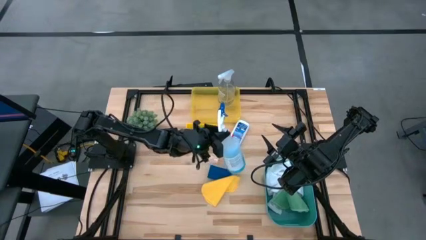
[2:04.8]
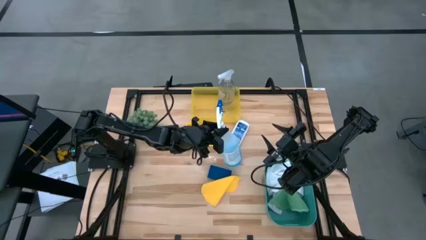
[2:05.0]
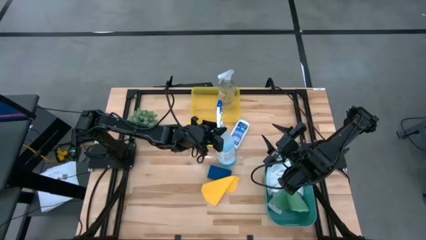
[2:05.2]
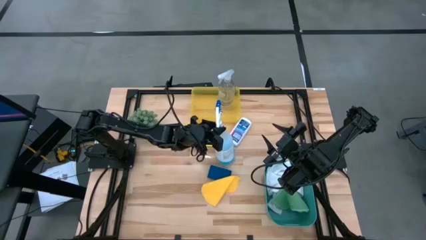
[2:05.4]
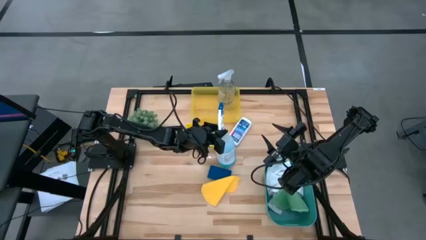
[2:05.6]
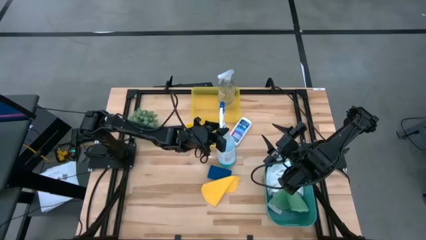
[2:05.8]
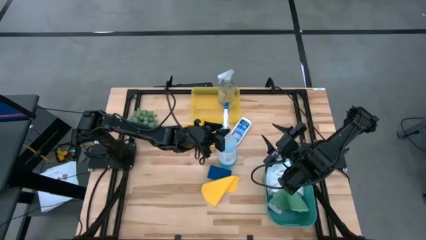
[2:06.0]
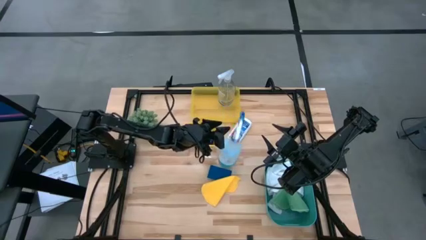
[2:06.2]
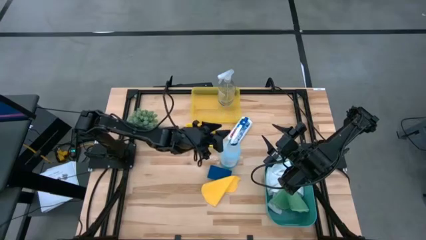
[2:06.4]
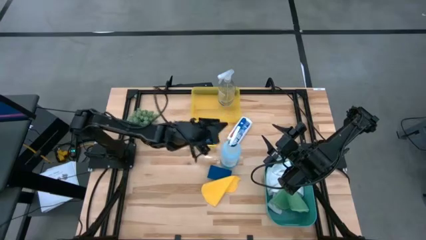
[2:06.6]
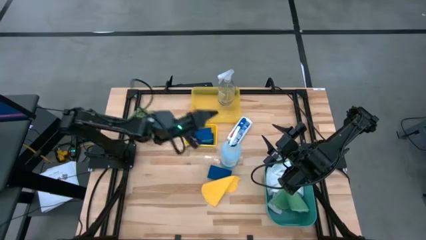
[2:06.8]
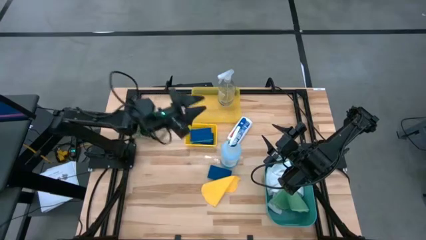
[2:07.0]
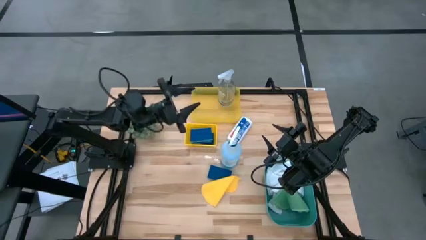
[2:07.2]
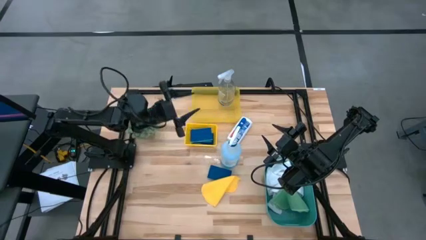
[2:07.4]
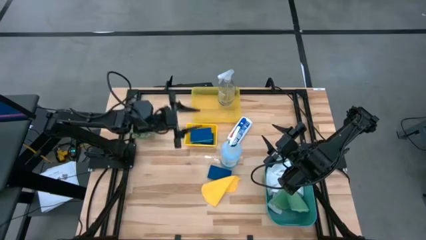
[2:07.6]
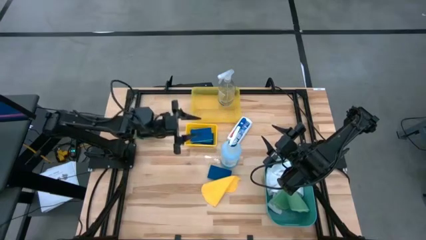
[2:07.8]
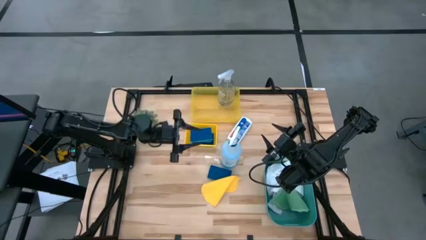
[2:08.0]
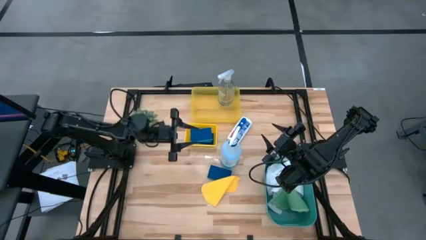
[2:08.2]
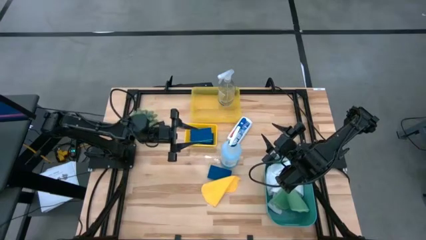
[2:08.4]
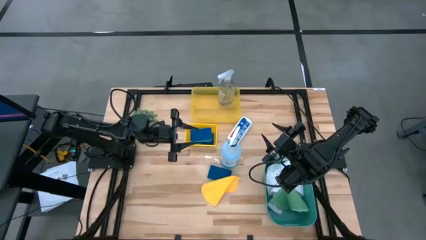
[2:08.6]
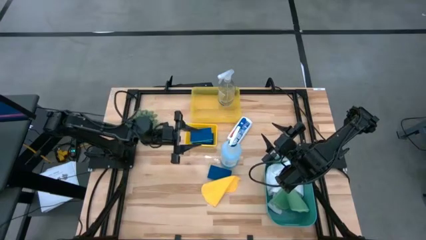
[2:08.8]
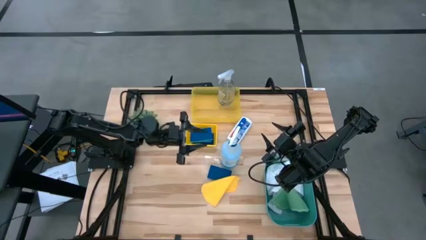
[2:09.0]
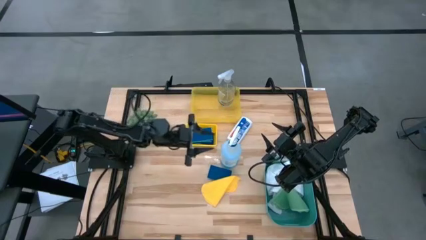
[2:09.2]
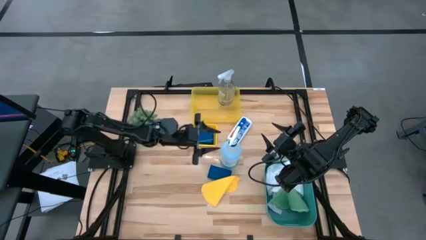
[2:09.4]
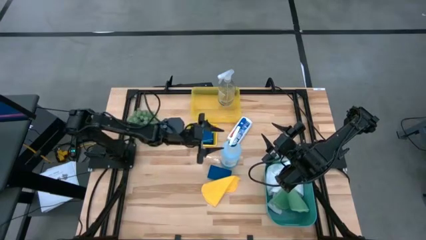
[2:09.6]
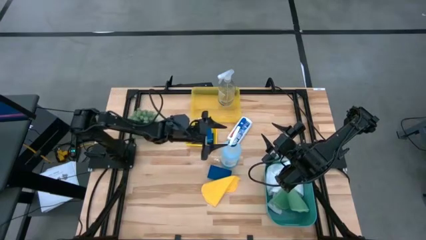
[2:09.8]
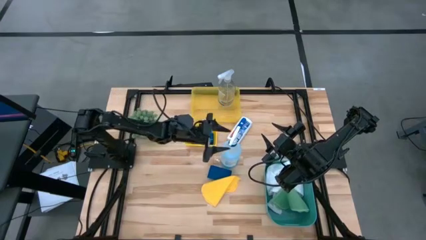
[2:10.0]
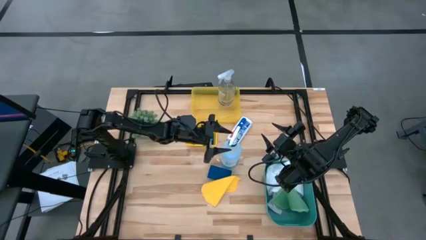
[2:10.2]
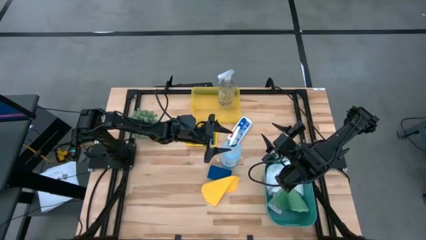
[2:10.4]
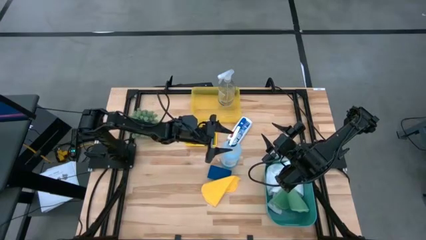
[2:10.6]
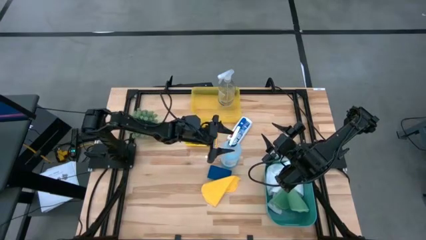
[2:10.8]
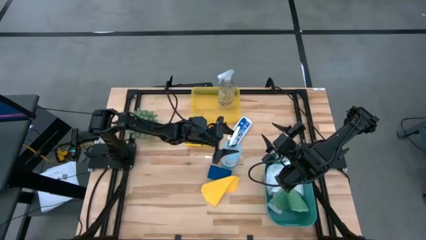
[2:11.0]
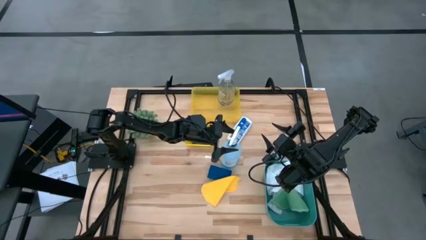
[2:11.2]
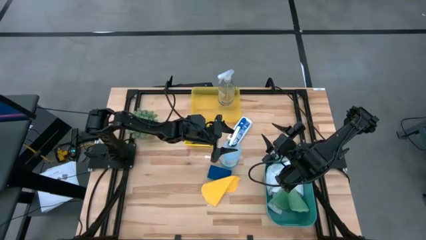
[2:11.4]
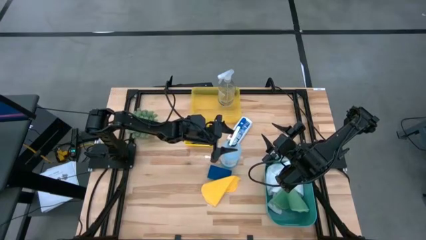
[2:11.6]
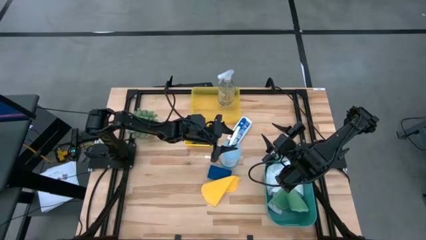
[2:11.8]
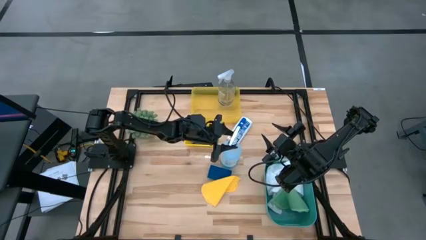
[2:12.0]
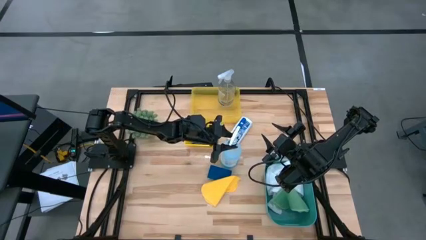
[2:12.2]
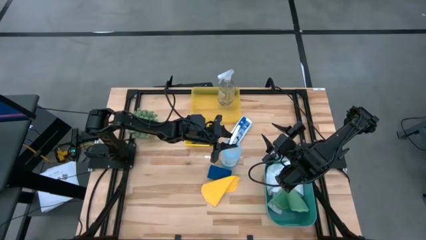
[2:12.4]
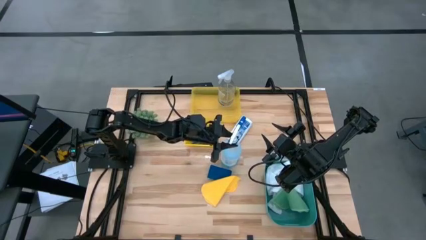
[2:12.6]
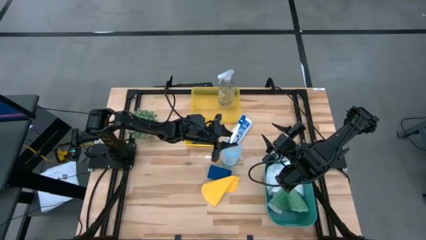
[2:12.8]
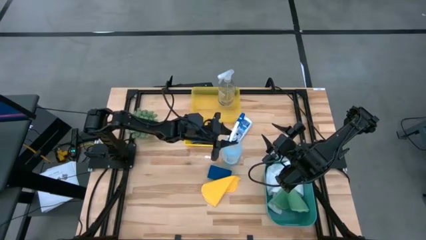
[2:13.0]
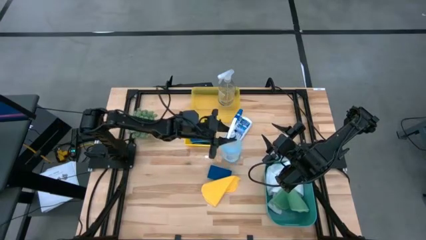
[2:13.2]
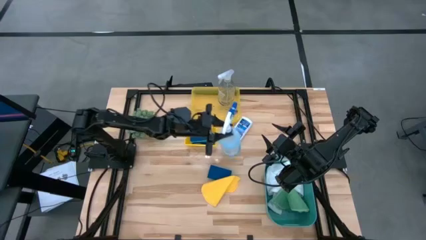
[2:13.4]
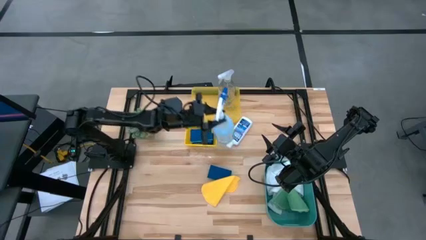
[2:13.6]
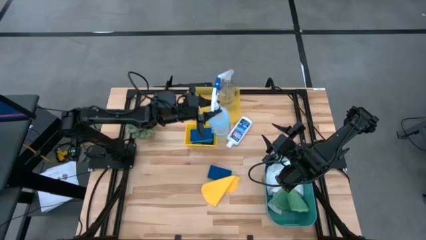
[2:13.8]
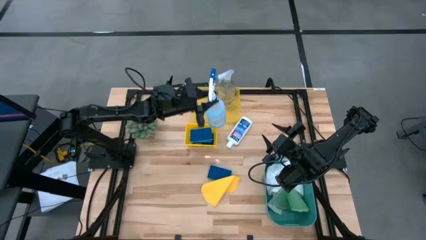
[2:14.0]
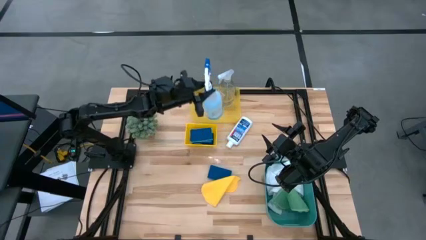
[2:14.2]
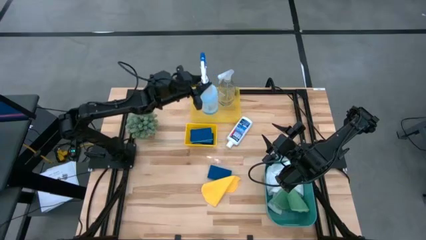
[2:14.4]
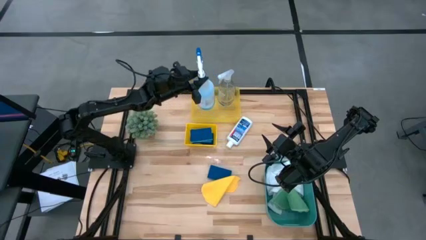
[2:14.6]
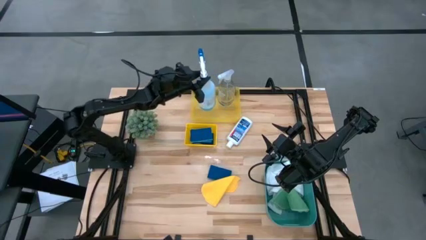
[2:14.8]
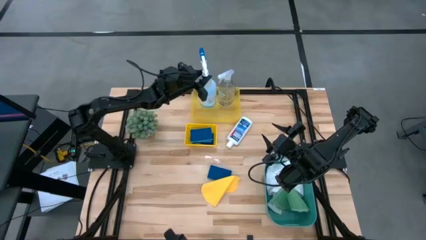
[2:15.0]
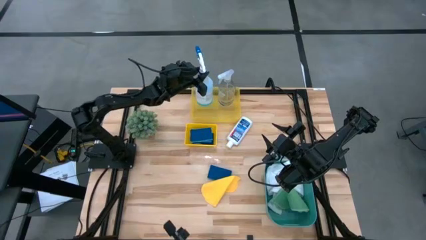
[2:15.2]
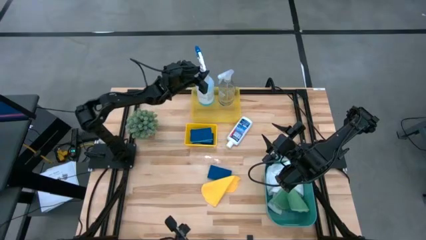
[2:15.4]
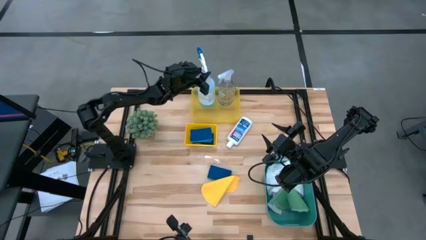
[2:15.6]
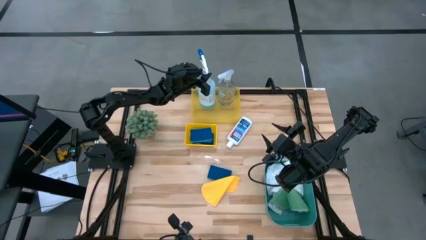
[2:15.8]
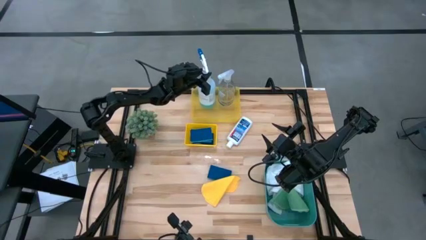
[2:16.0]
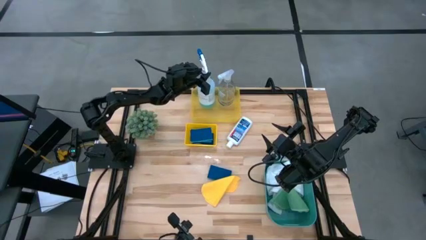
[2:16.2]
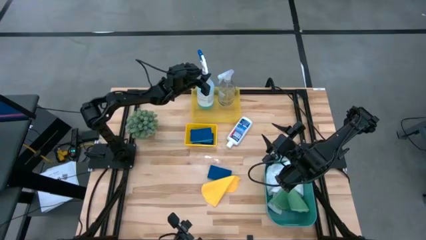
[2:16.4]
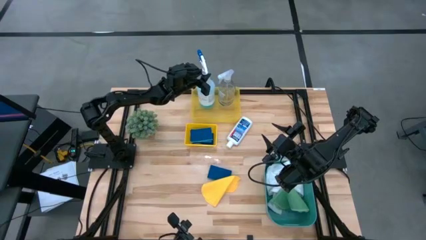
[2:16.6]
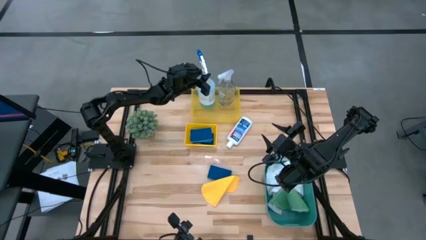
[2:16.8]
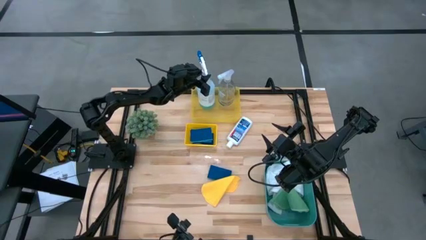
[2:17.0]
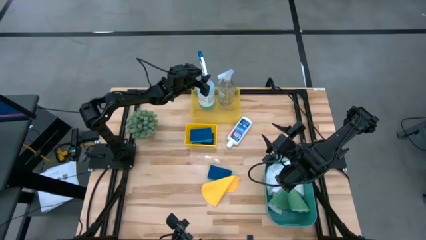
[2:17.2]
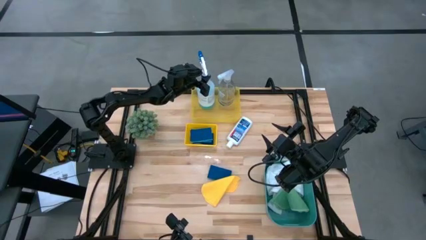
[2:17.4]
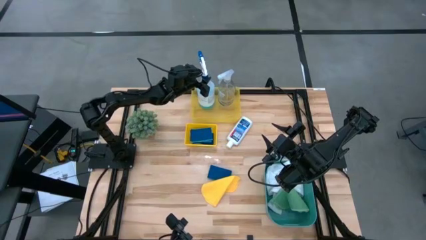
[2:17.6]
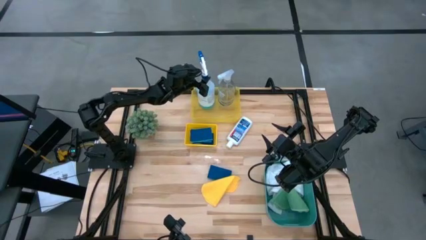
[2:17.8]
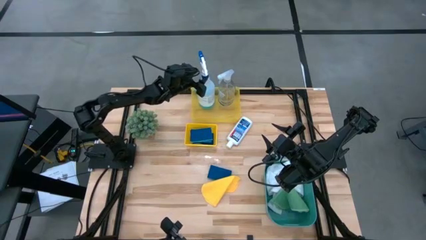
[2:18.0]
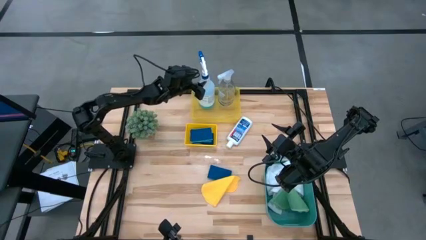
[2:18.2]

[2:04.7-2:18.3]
Task: Pick & Place Kitchen Items
Put the blue bottle into the top yellow bin
